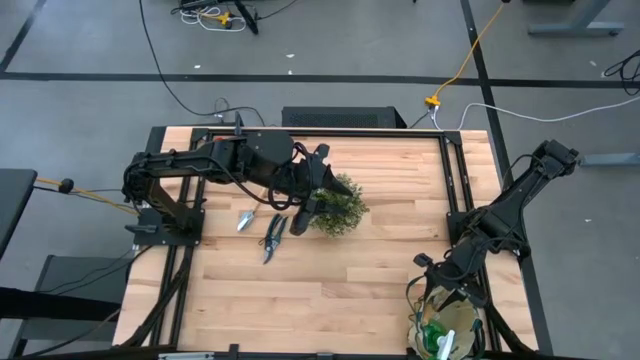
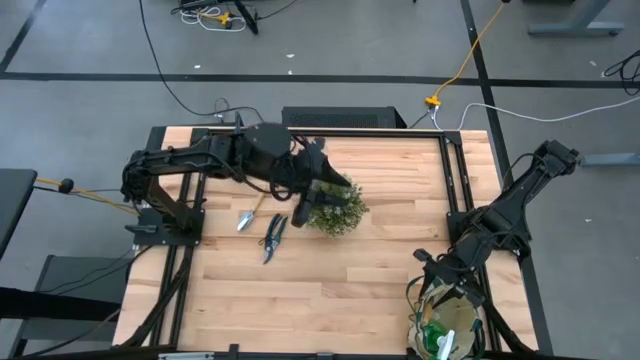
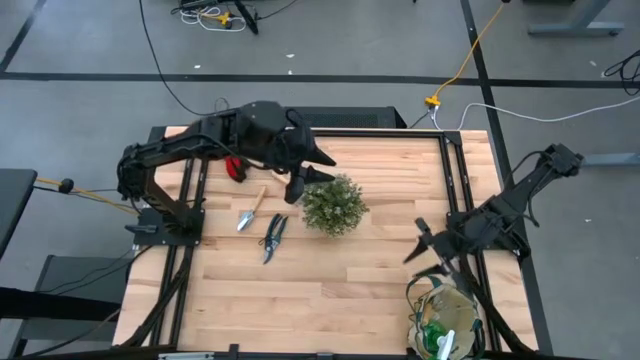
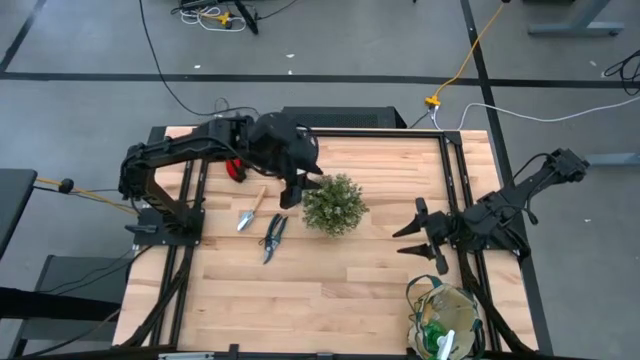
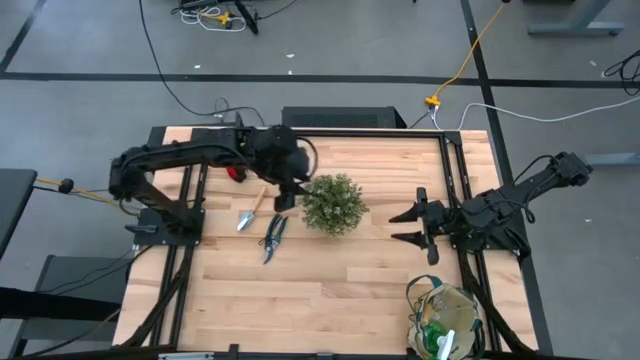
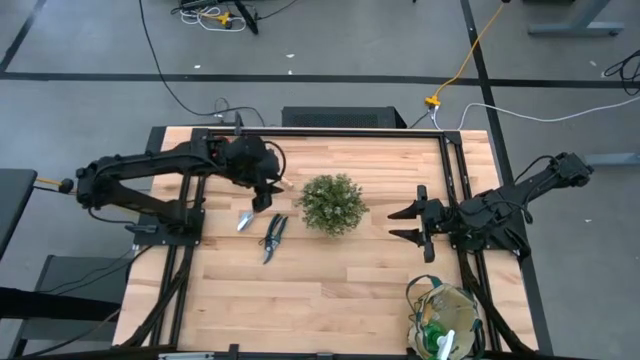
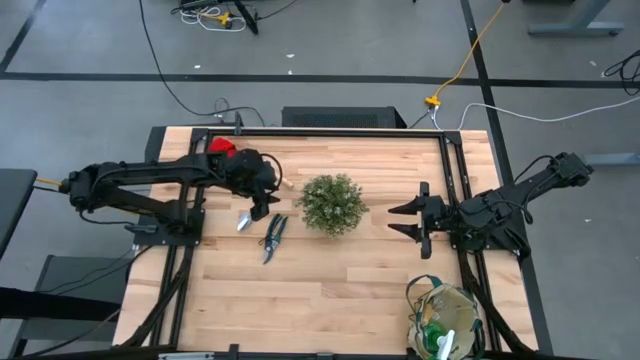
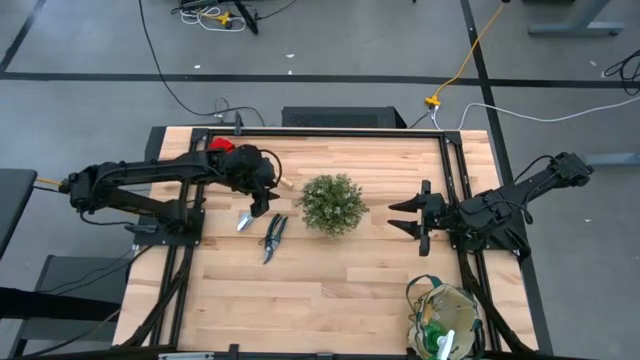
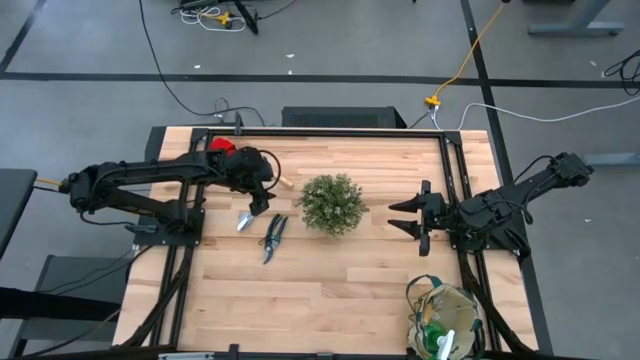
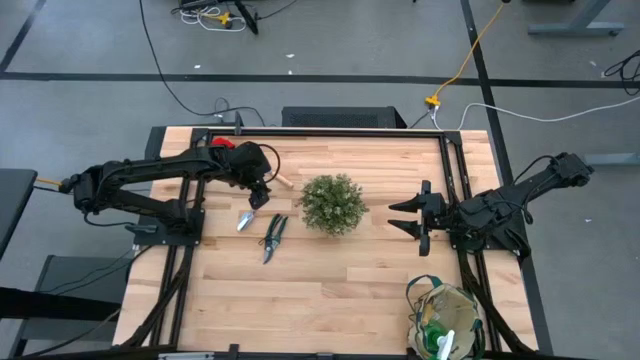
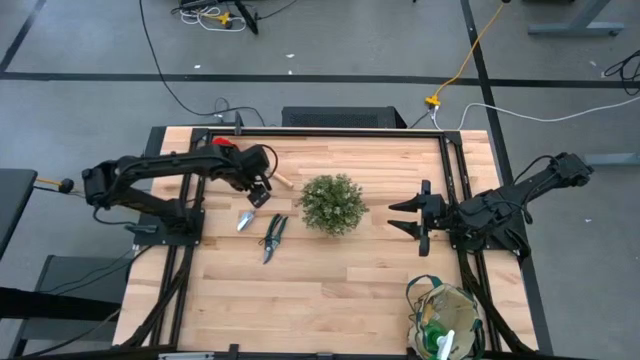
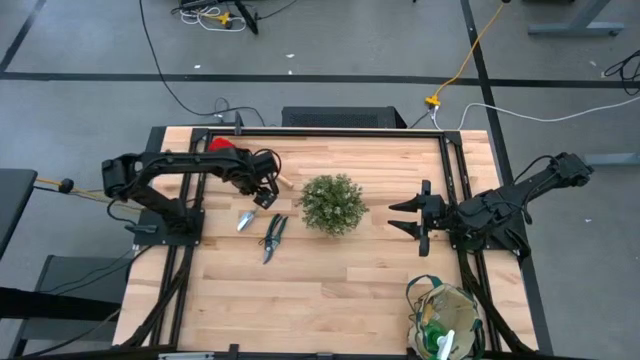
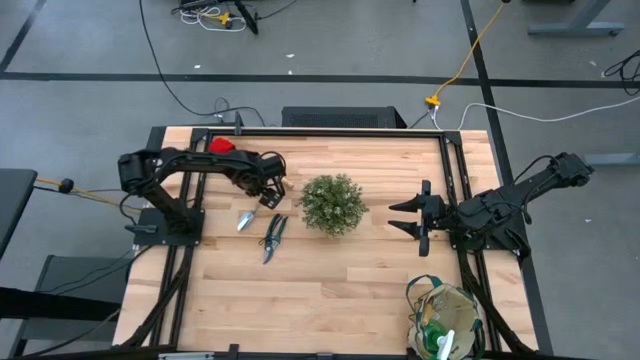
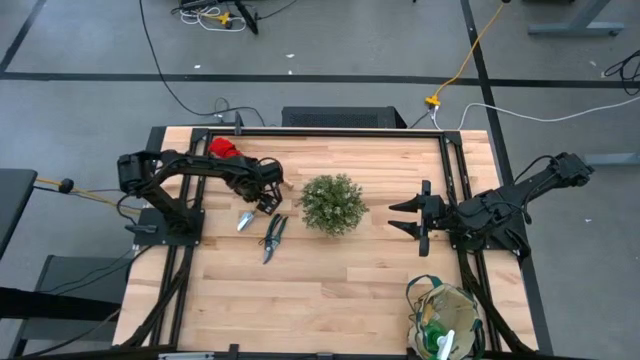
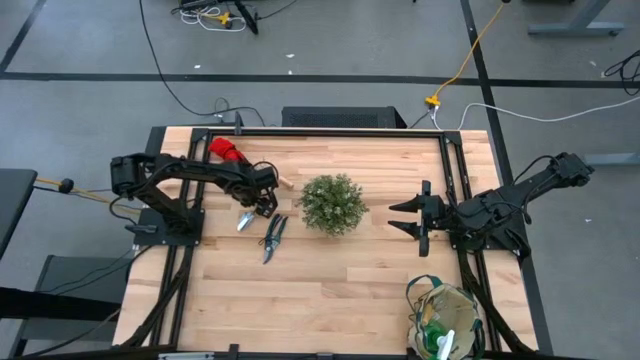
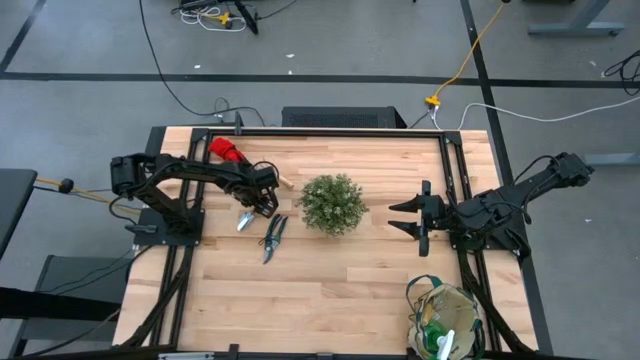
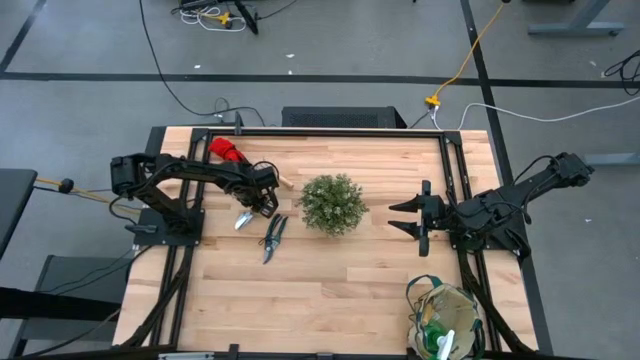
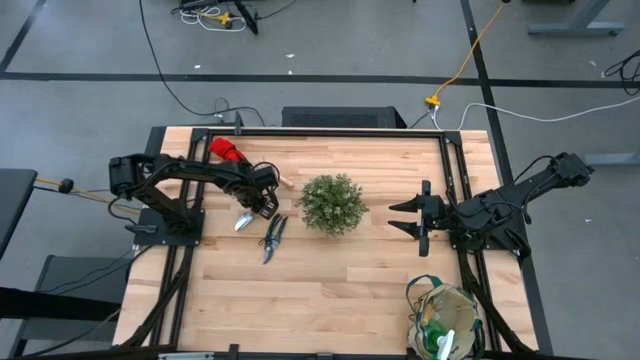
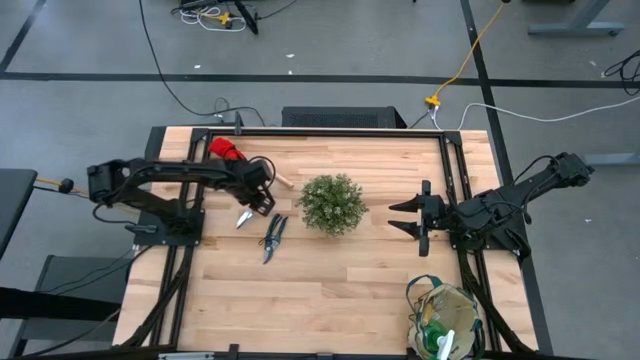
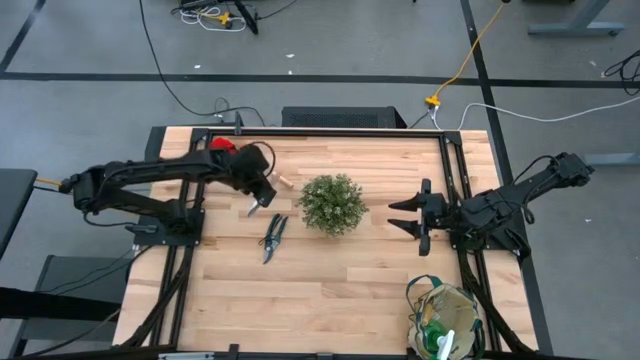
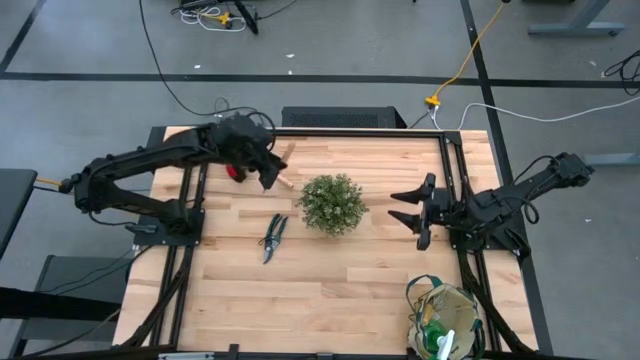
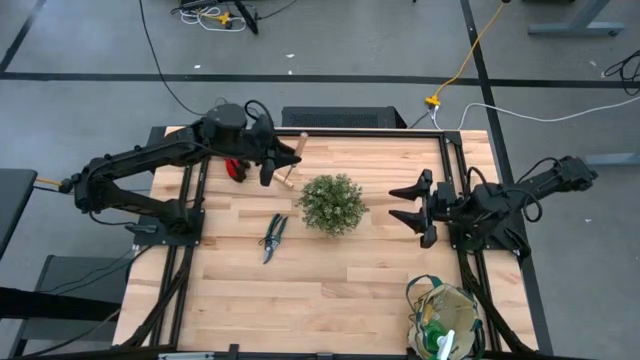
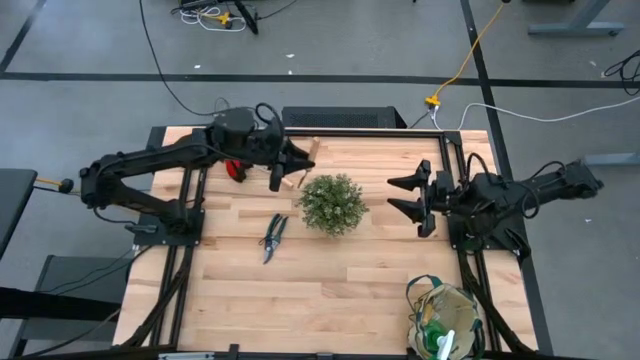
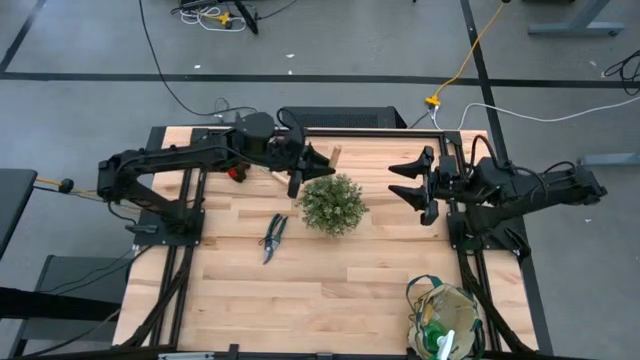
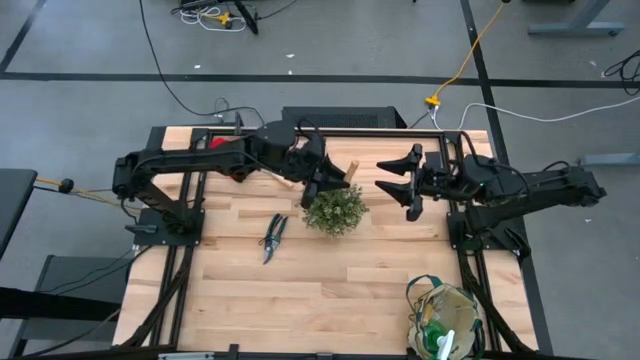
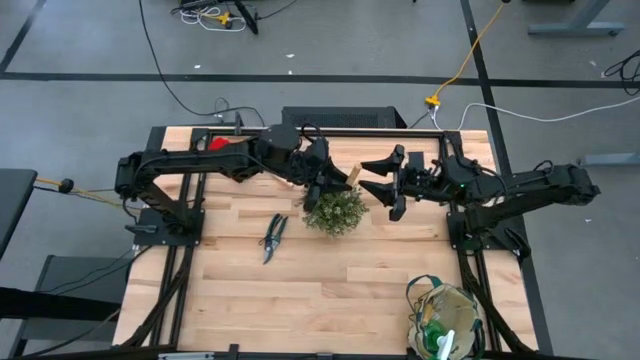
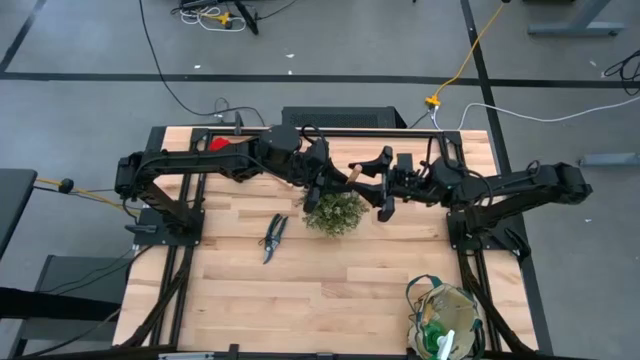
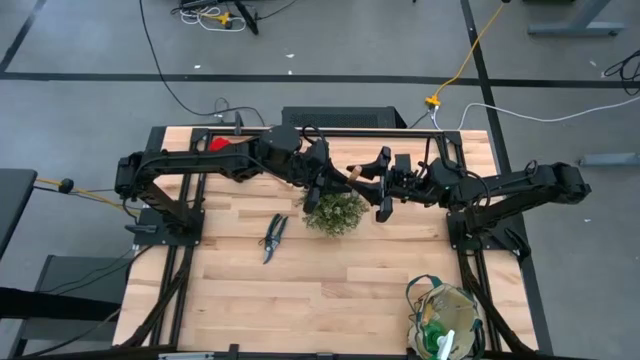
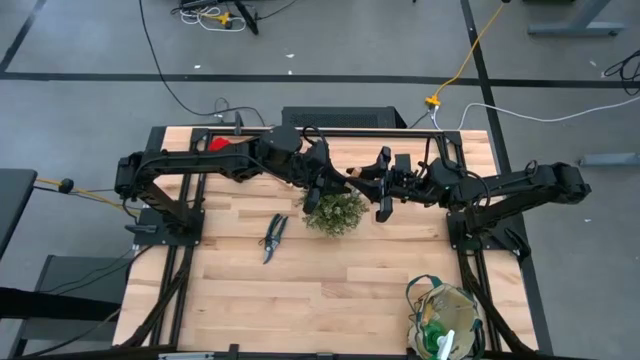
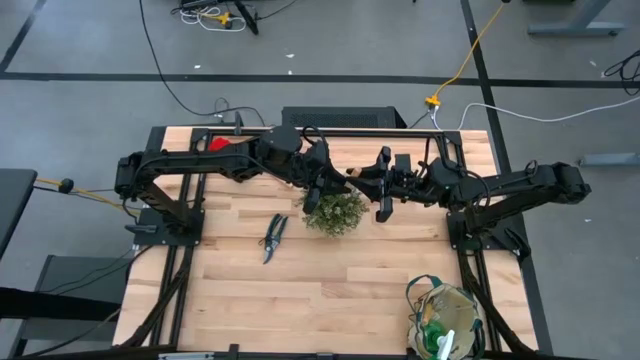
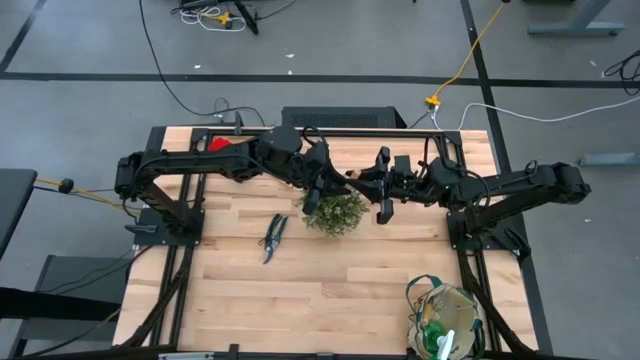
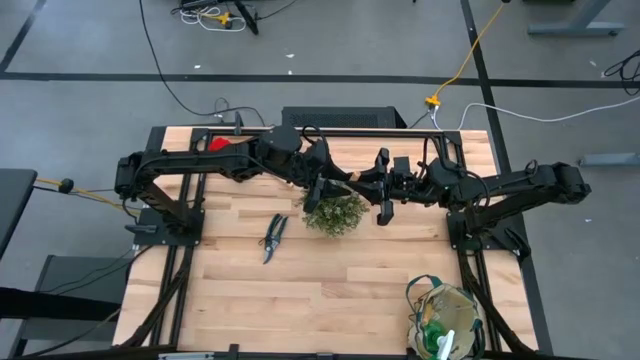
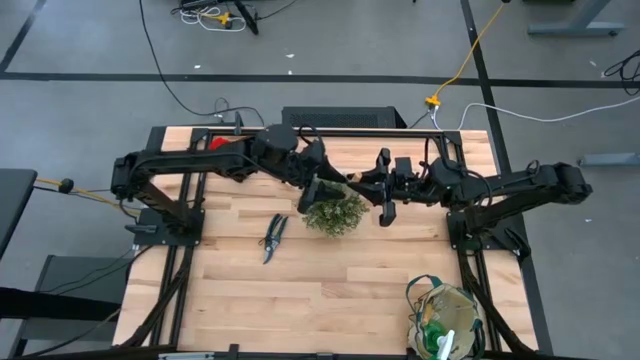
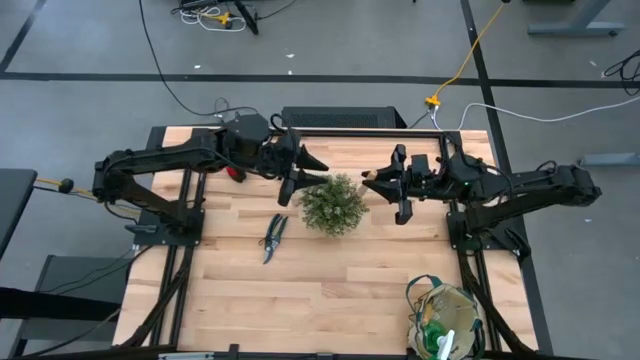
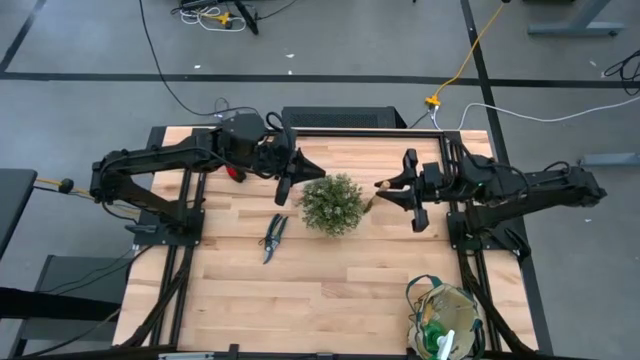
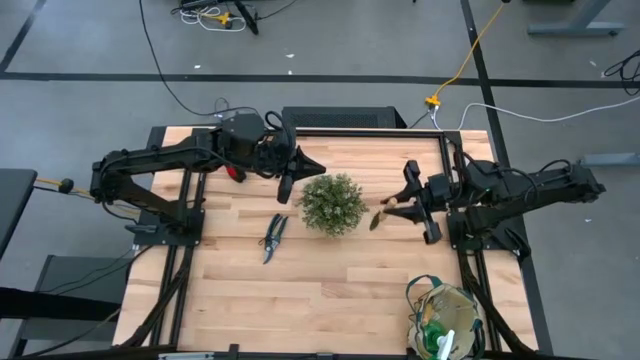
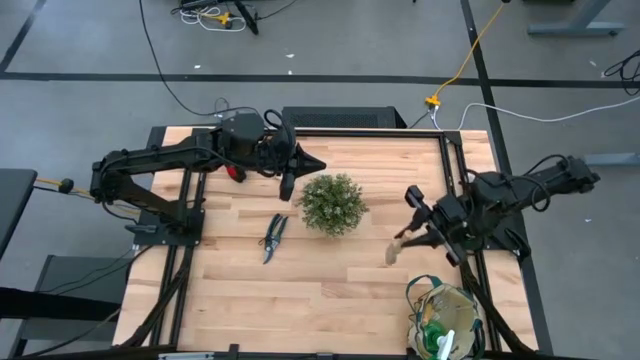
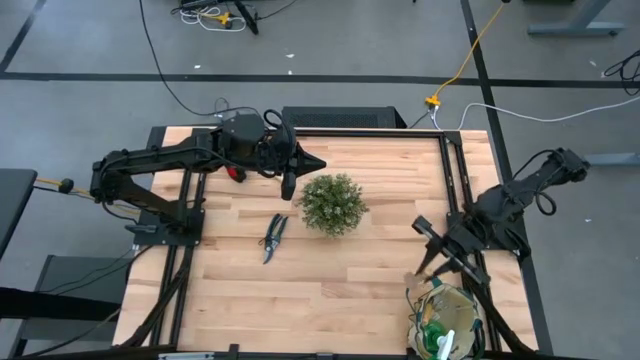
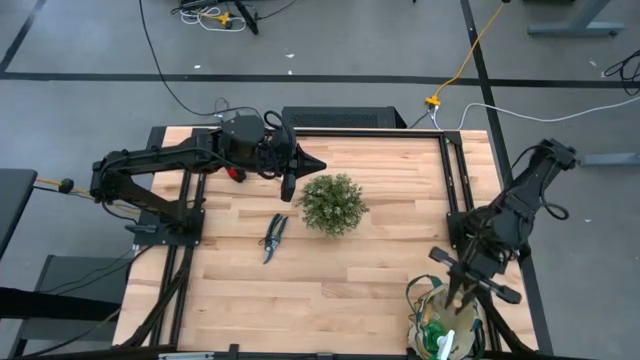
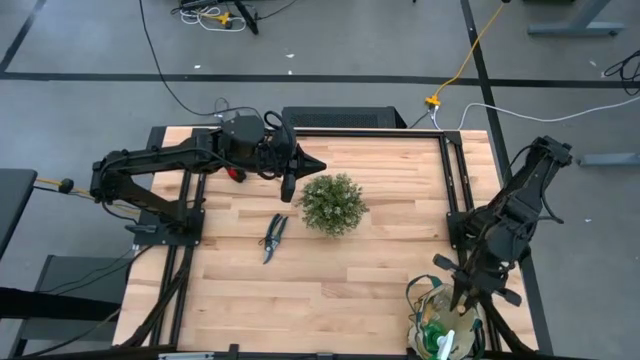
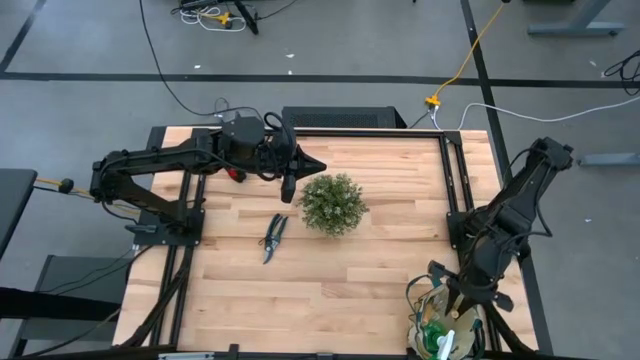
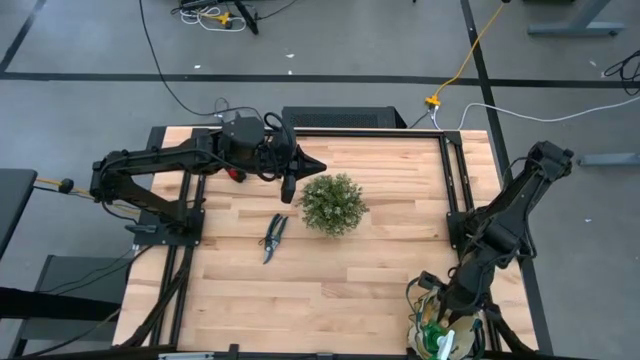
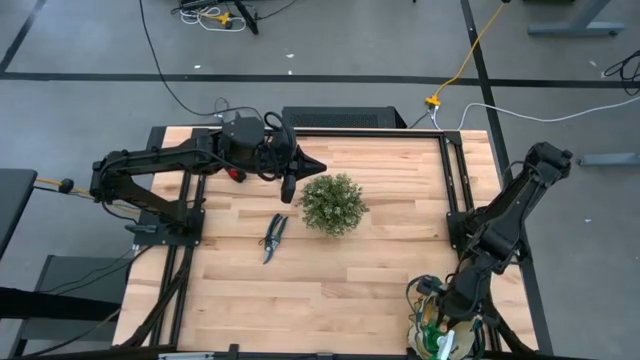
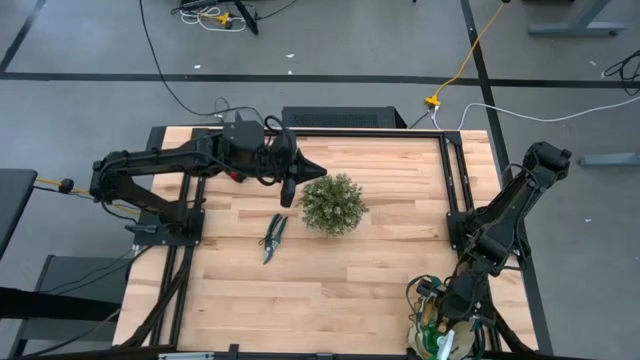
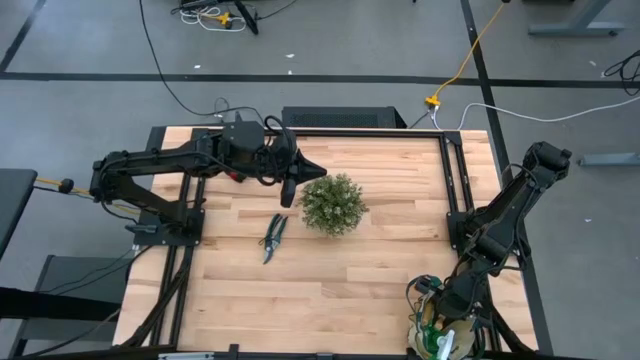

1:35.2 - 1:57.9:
Task: Pick & Place Garden tools in Gardening bag
Put the hand trowel into the white gardening bag
